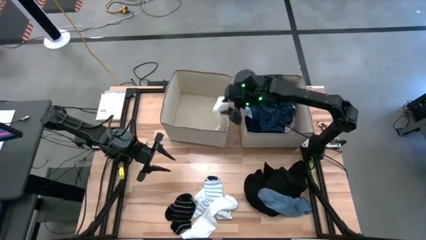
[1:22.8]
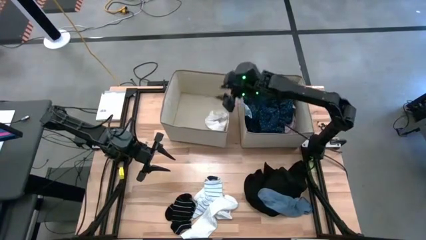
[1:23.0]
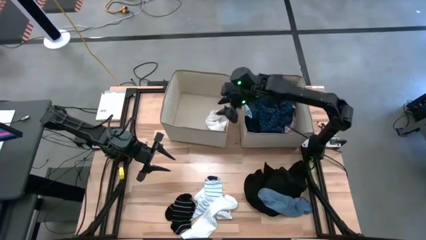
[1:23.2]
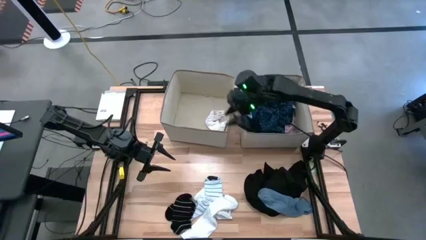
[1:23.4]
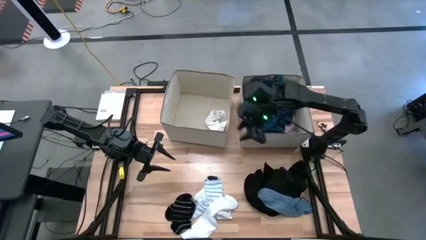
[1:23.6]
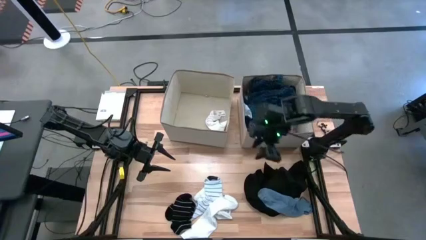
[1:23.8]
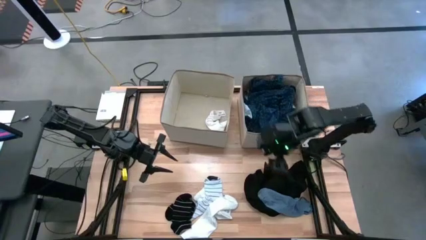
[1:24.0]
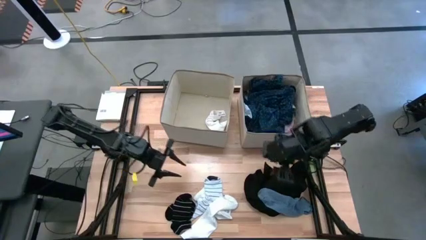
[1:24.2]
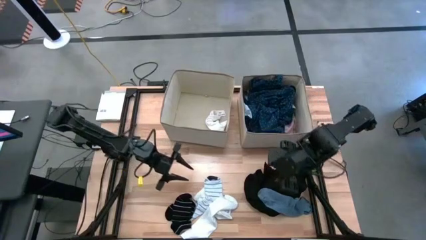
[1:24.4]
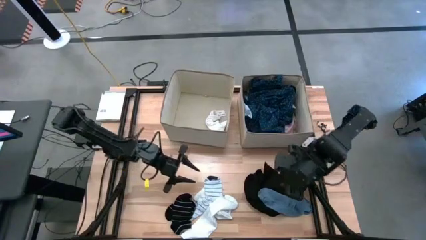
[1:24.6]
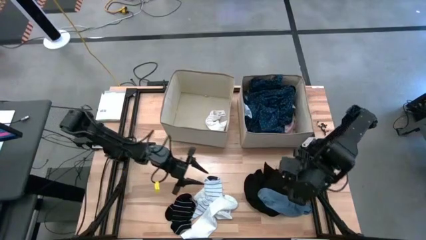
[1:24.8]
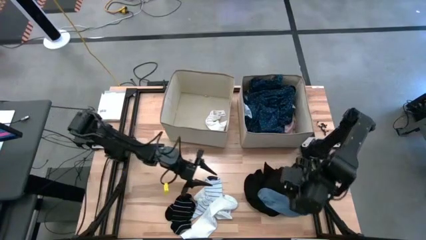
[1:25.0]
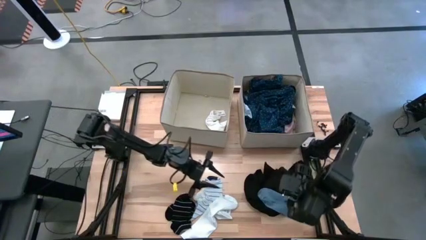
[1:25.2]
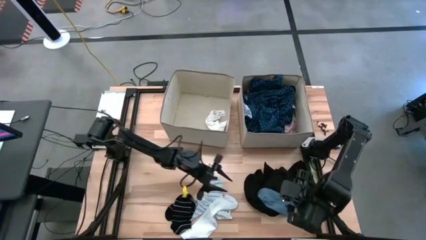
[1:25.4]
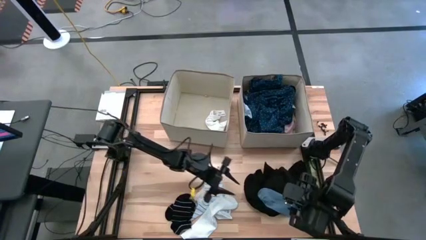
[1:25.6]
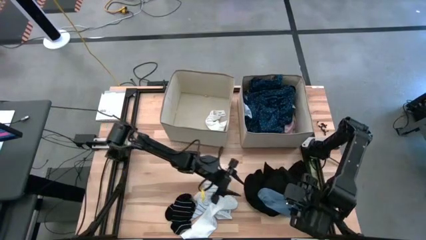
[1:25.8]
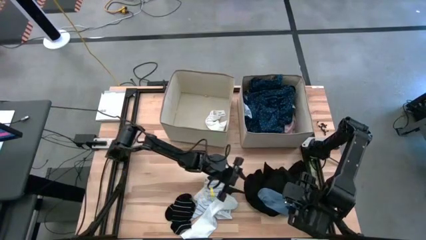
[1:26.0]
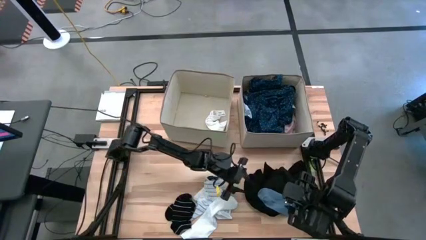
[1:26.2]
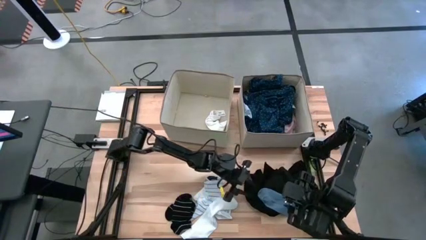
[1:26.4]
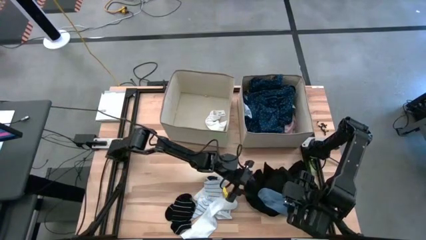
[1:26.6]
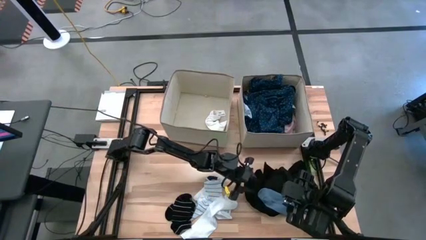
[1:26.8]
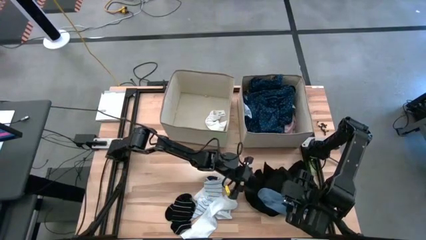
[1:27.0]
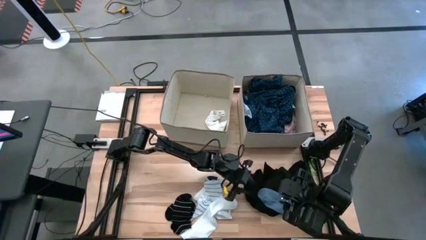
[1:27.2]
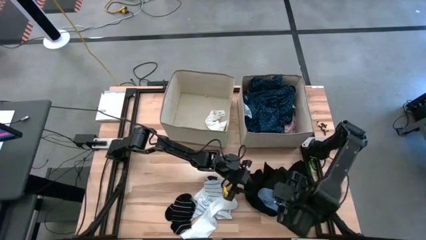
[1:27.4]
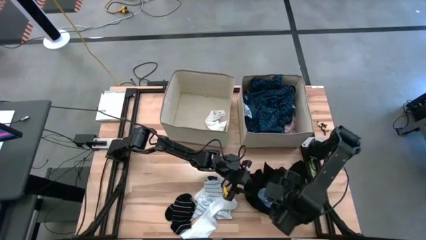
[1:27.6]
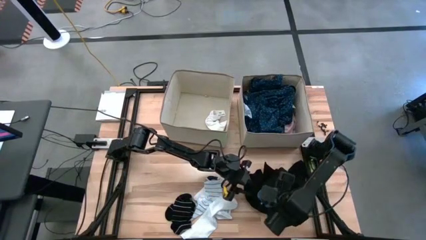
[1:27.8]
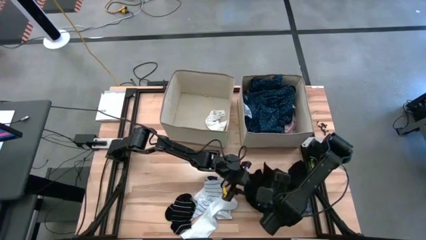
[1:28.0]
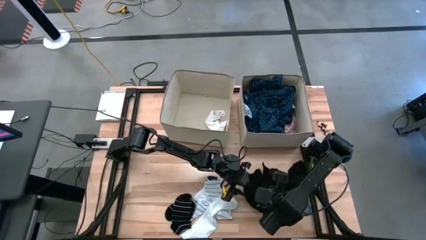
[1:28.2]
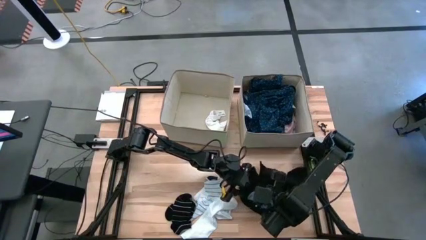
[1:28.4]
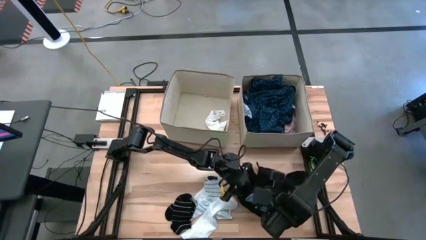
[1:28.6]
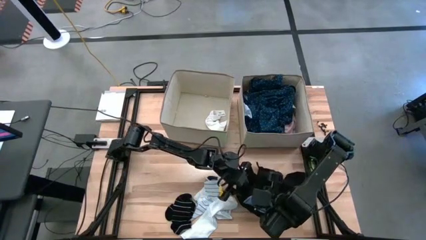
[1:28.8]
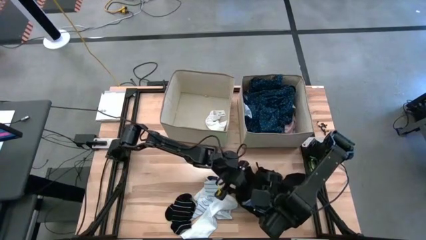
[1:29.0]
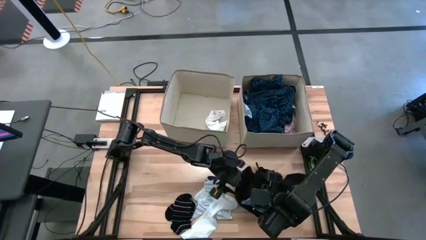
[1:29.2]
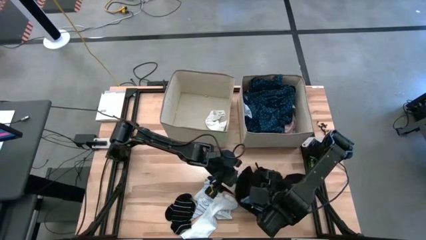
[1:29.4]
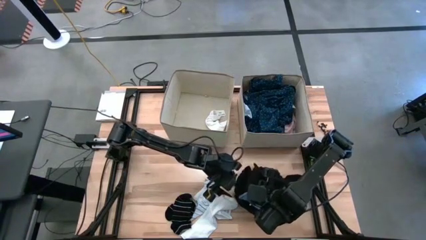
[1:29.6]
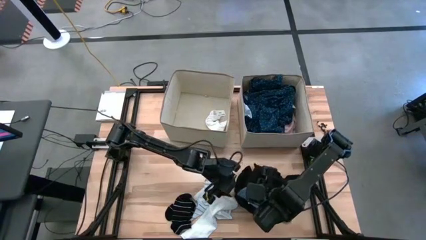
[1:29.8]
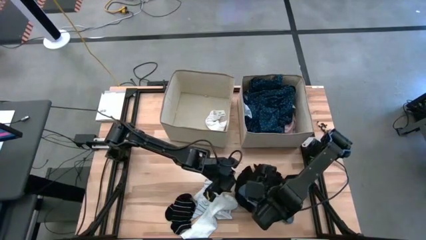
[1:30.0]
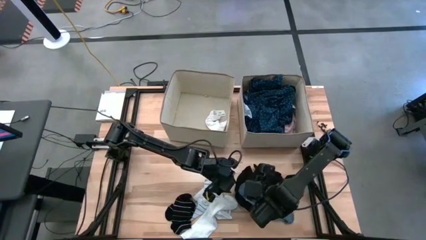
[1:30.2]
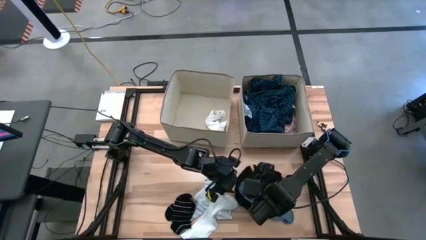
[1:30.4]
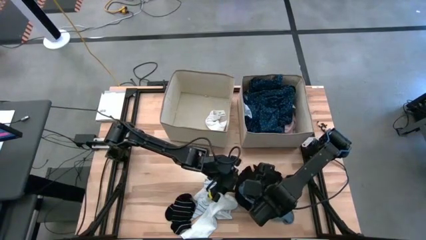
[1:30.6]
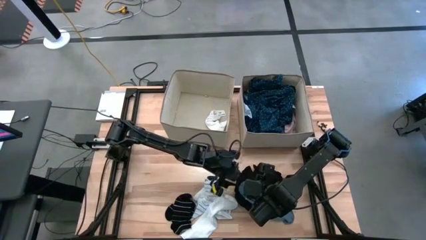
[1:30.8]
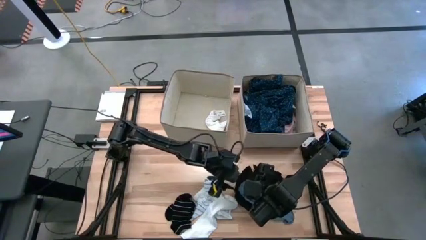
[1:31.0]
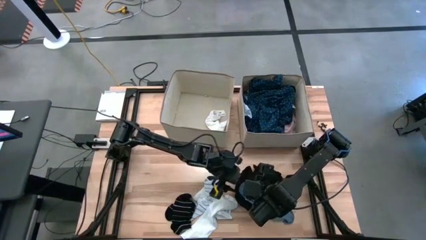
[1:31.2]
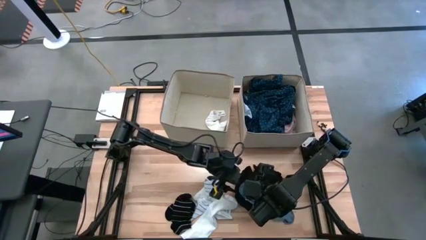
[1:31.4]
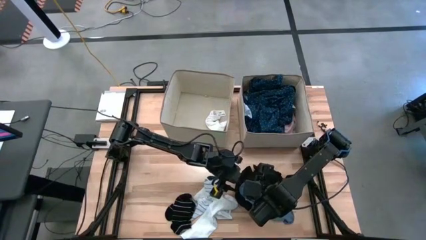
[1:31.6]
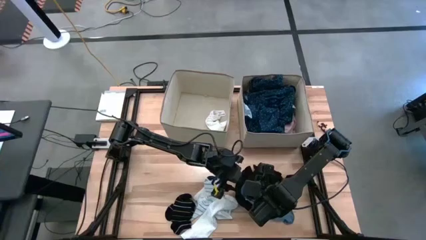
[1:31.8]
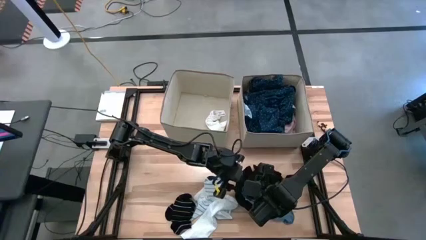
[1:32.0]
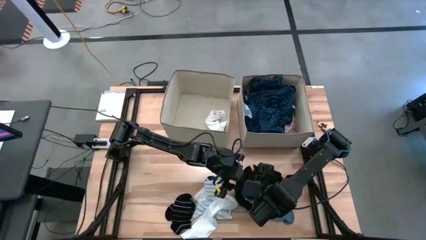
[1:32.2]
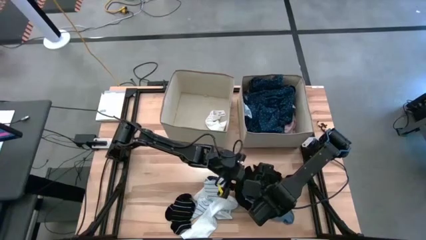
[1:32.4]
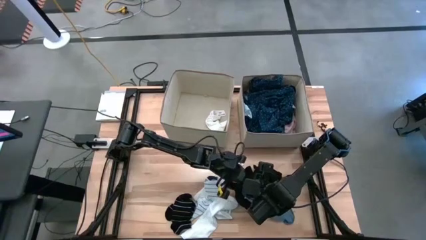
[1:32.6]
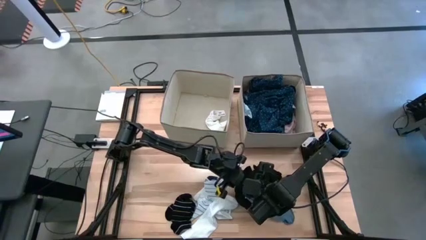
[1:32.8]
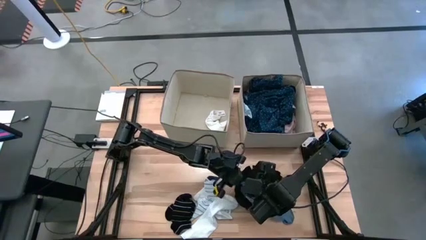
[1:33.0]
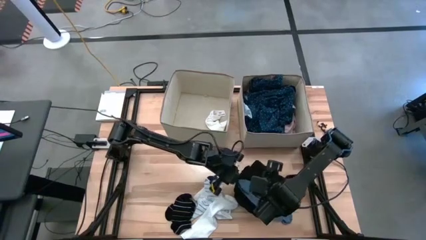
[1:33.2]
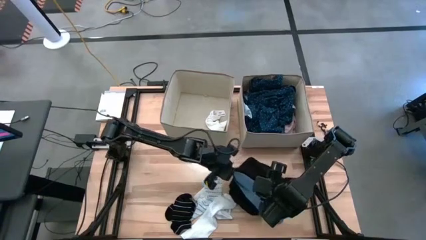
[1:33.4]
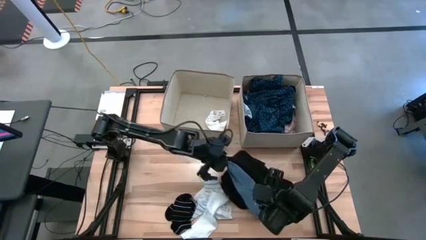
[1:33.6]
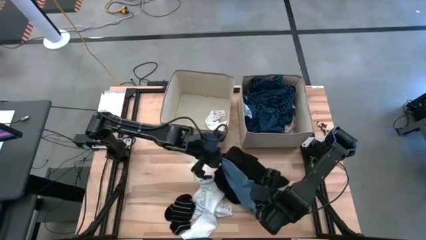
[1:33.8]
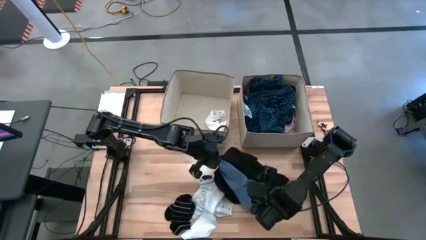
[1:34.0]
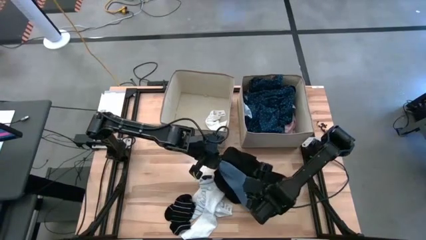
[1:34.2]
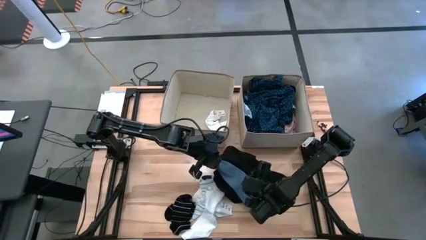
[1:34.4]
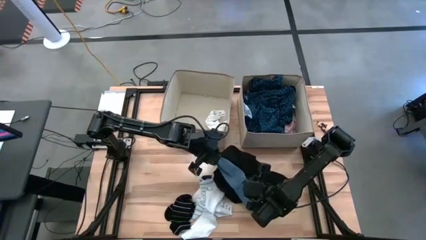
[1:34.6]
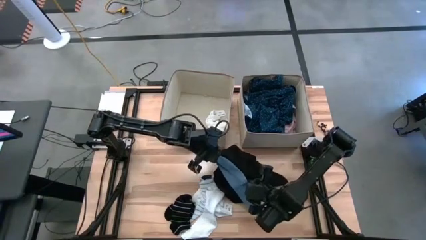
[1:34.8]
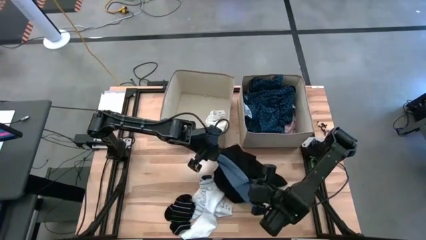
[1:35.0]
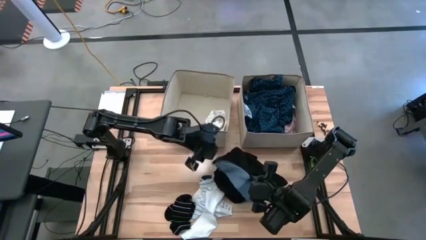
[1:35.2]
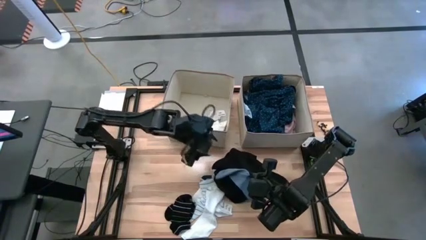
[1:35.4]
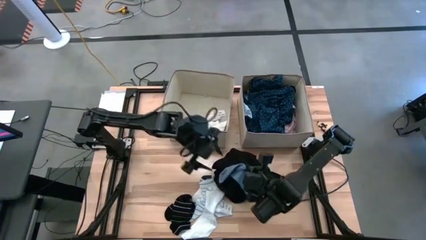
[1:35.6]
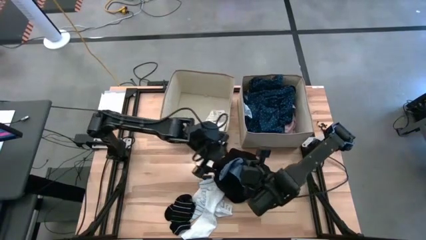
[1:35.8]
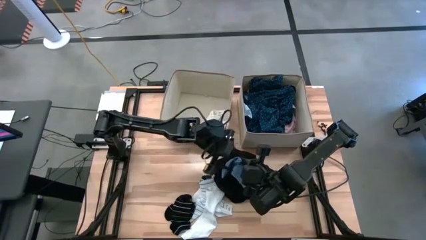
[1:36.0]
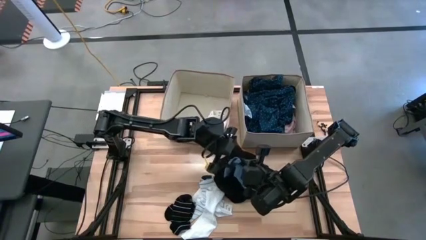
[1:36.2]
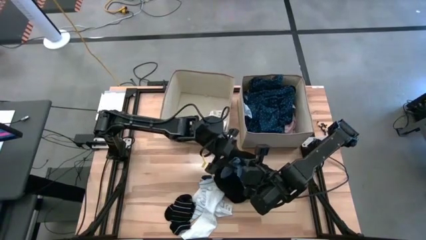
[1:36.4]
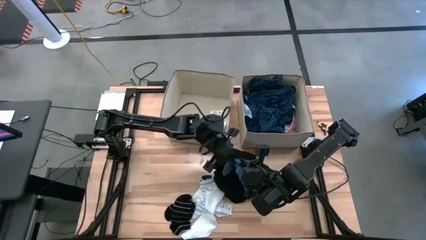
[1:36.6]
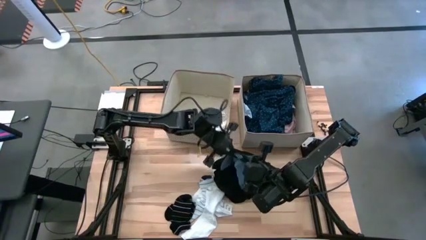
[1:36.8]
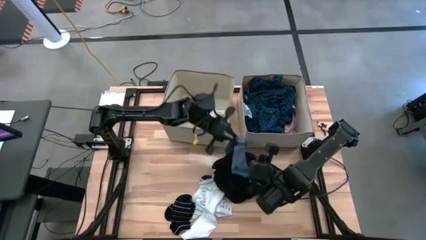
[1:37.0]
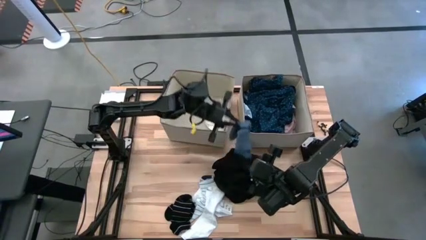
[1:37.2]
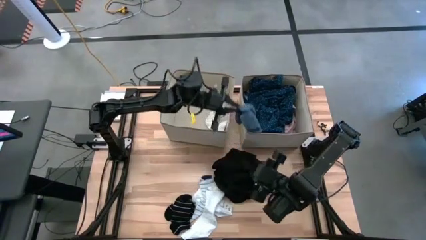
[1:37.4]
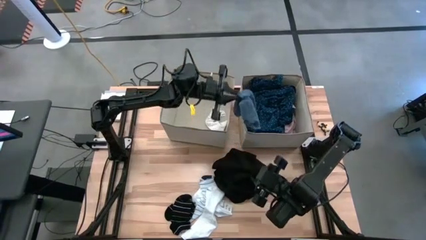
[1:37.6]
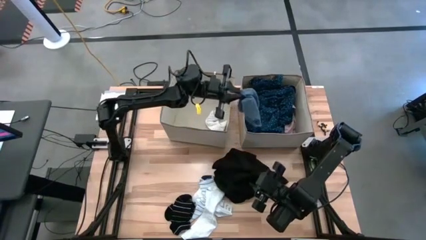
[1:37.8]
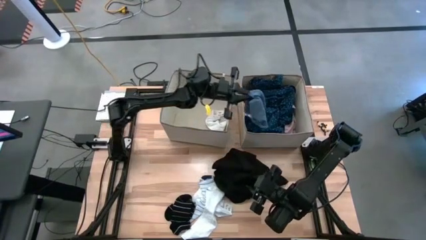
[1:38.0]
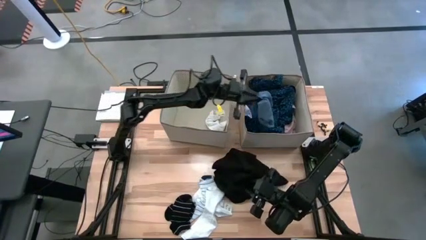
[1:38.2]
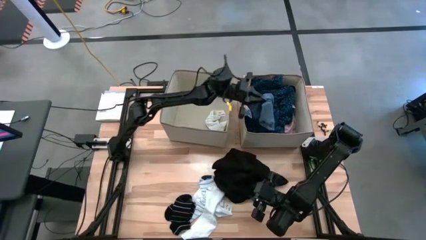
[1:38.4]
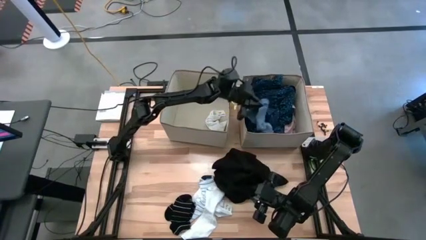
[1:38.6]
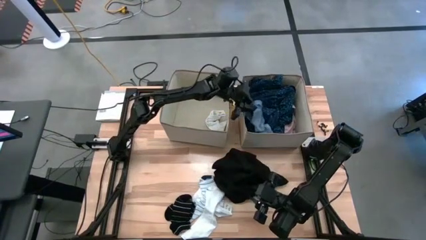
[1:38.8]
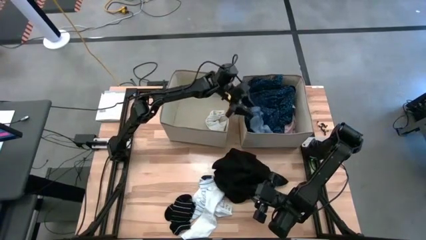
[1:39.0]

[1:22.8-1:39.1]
Task: Sort clothes
Put the blue sock into the right laundry organizer
